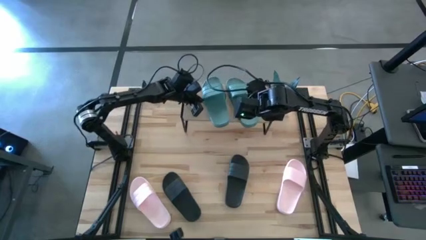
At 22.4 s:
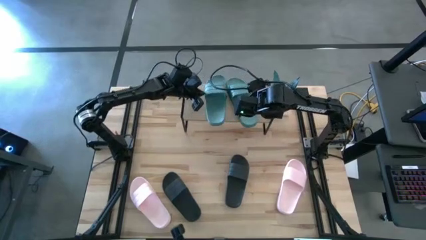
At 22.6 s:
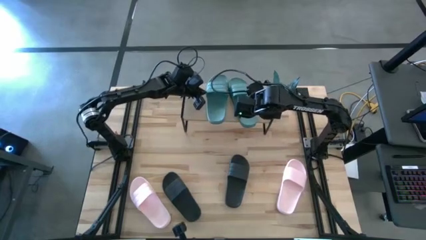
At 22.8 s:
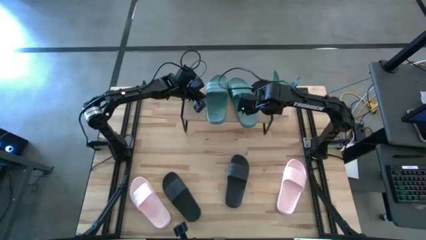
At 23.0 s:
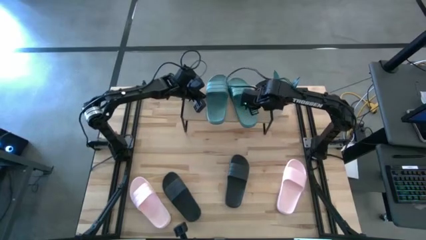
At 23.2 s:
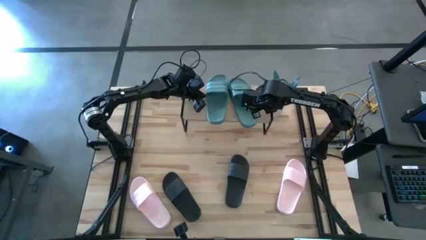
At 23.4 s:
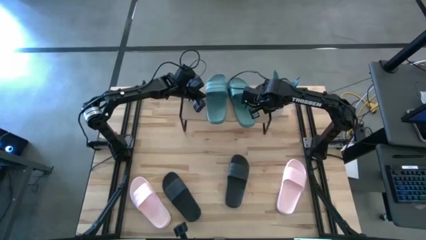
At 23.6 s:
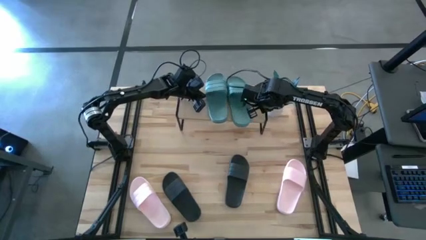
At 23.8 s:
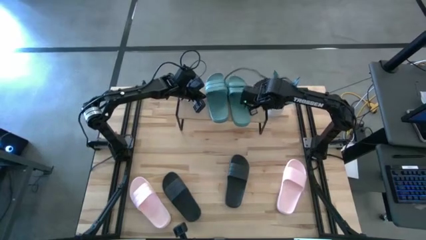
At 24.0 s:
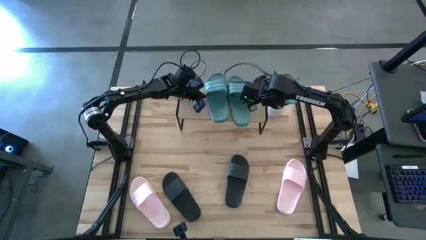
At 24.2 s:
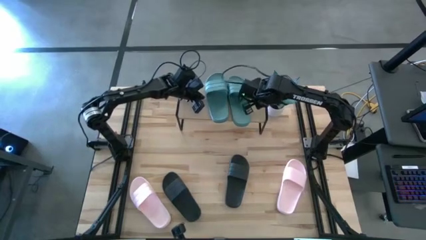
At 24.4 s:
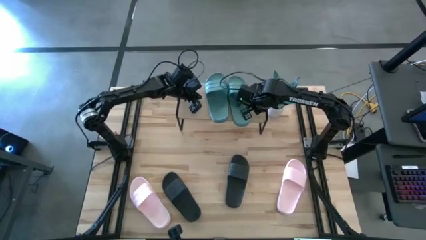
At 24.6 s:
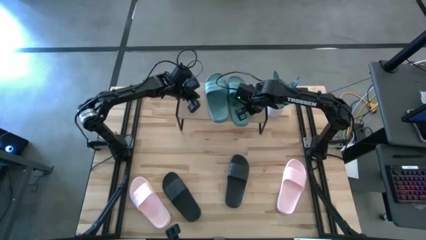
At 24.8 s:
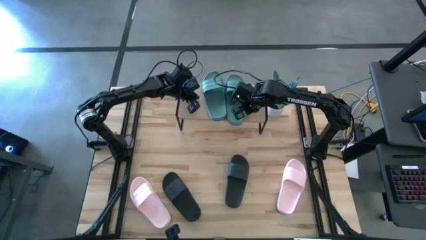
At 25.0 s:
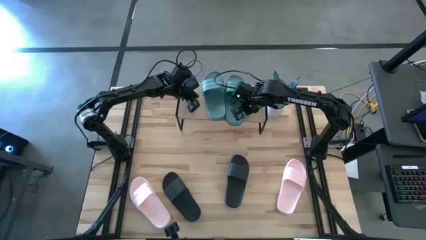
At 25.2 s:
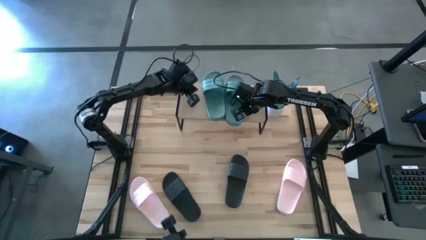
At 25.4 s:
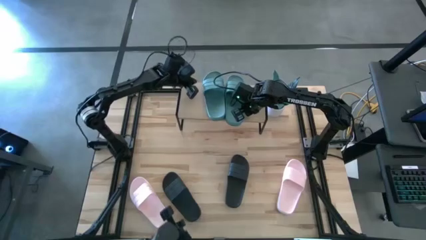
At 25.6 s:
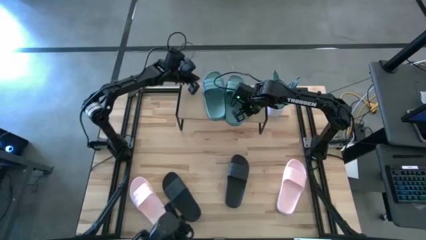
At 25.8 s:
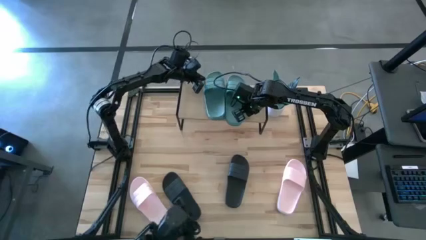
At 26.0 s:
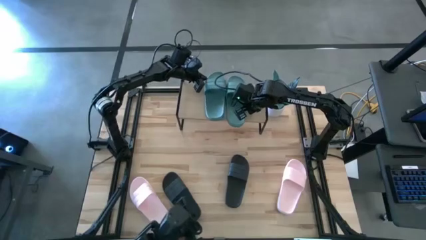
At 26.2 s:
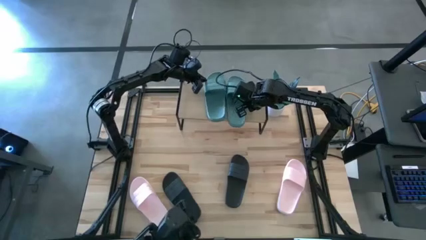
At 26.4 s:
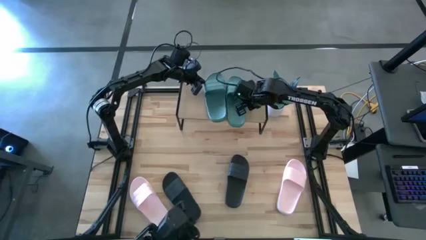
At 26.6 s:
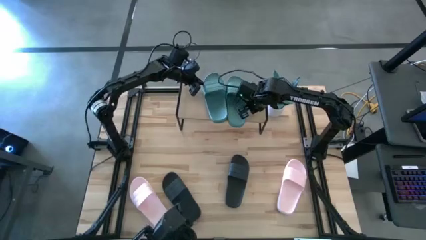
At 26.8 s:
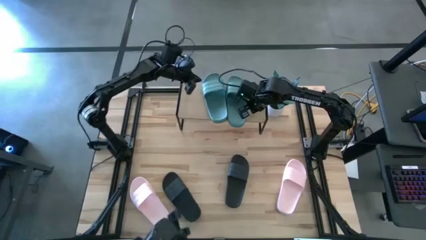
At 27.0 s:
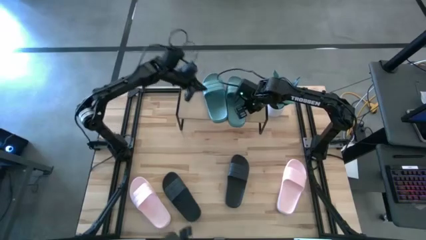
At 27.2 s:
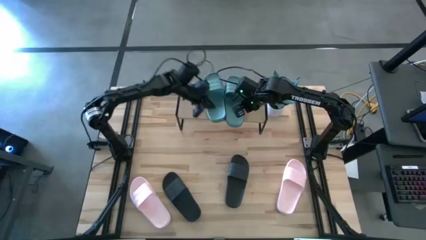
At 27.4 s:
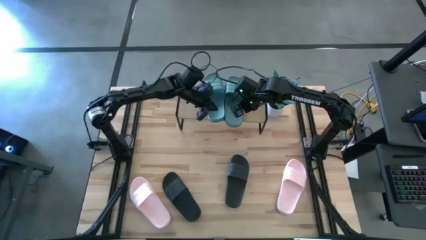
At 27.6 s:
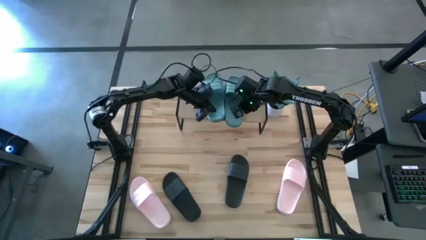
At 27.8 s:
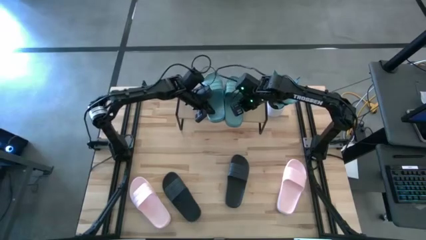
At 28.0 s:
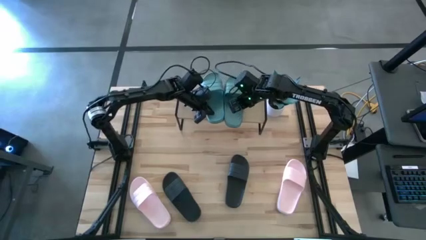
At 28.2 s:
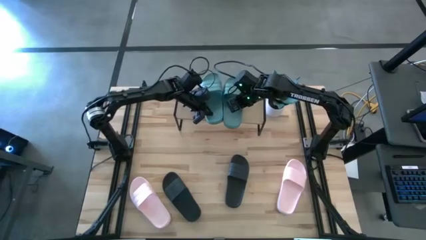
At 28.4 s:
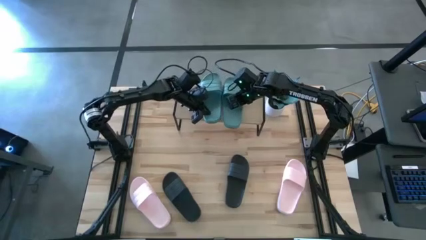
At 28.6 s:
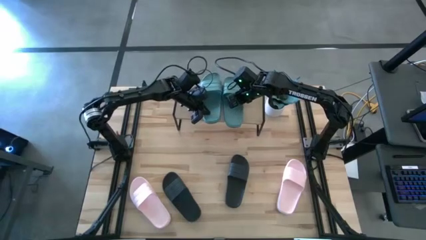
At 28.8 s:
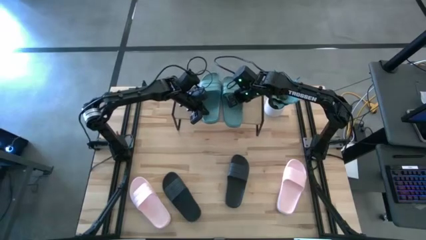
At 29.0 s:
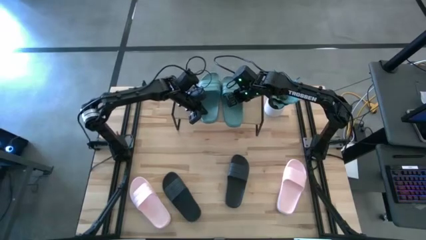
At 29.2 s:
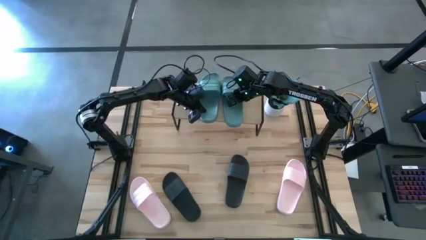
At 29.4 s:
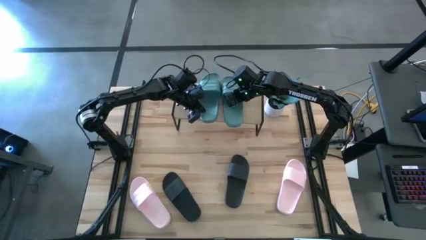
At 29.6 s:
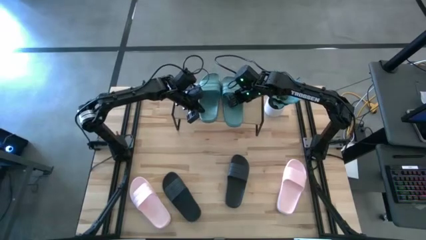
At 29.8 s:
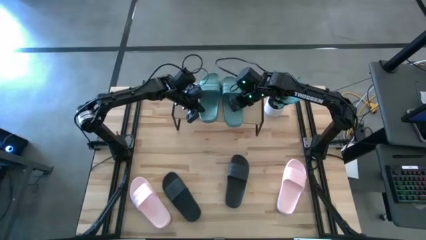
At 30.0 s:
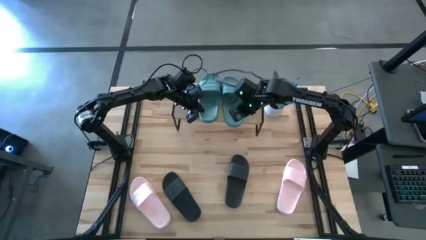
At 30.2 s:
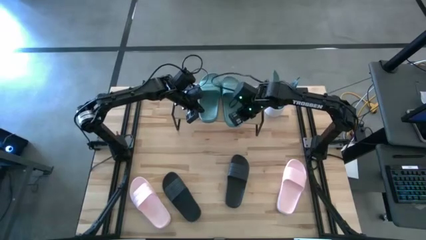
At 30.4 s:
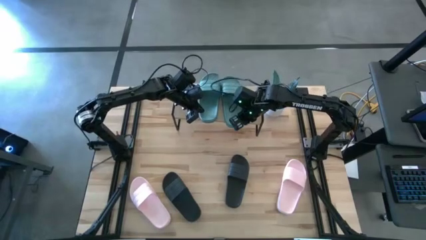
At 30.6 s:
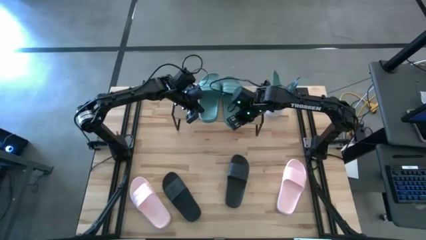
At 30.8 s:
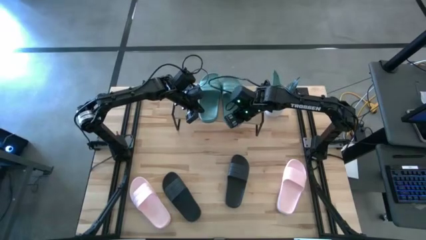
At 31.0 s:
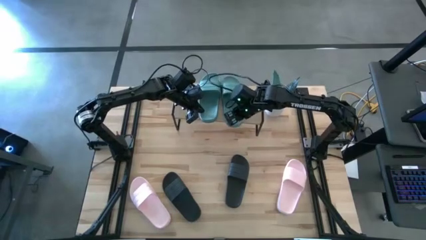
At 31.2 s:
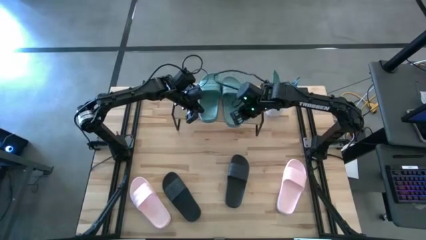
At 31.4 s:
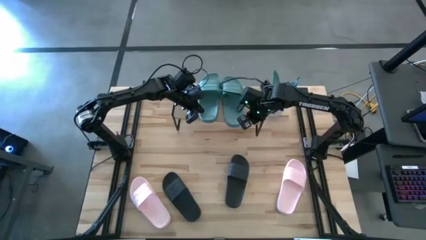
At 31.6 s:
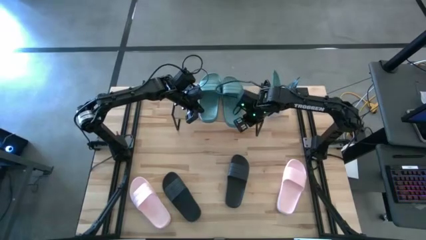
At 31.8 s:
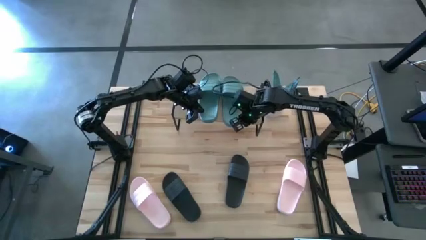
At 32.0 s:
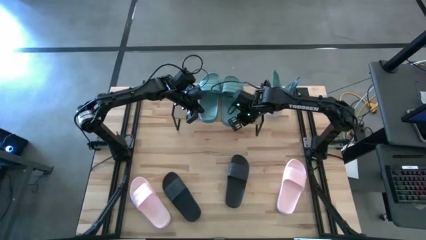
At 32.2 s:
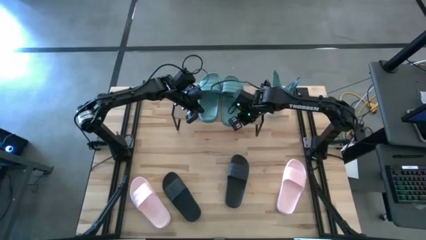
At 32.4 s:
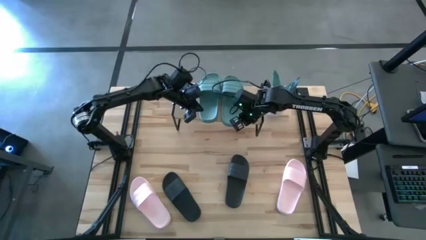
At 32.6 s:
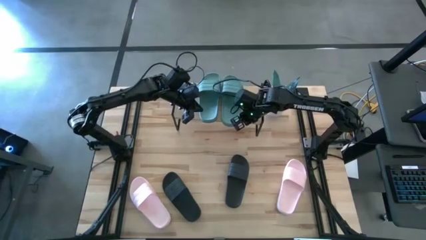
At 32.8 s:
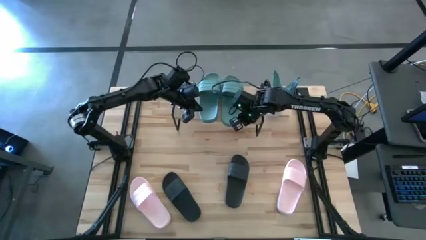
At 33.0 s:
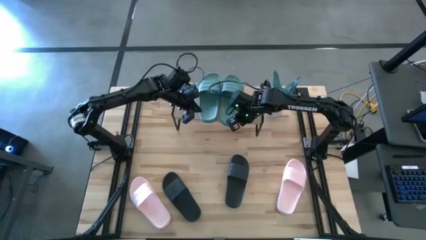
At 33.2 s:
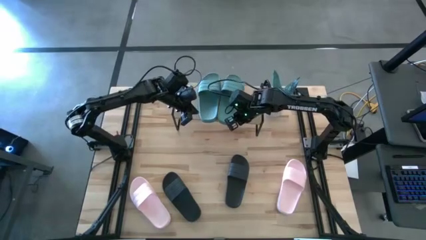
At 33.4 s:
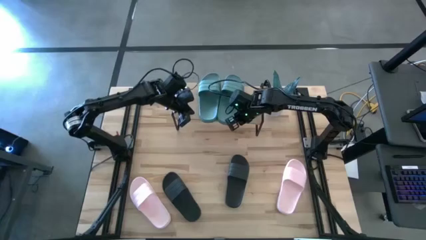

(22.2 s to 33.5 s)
Task: Pick and place slides into the shelf
Adjust the green slides on the shelf

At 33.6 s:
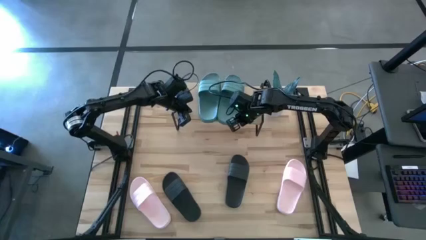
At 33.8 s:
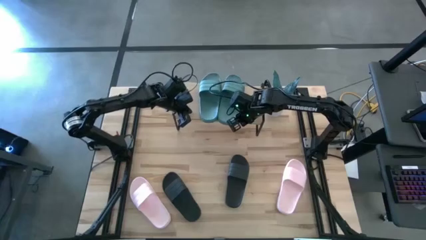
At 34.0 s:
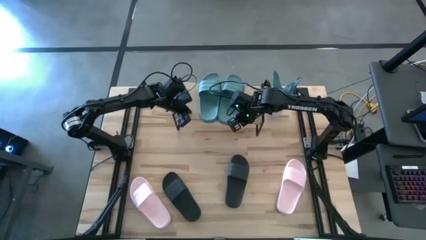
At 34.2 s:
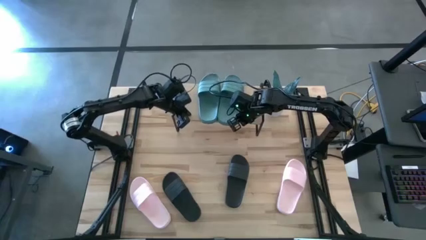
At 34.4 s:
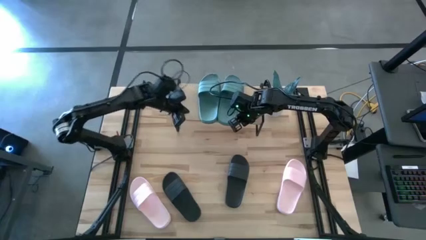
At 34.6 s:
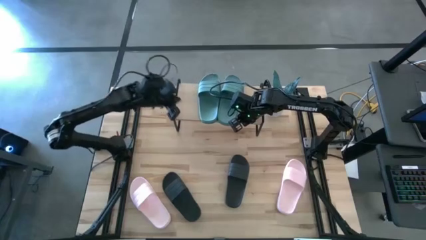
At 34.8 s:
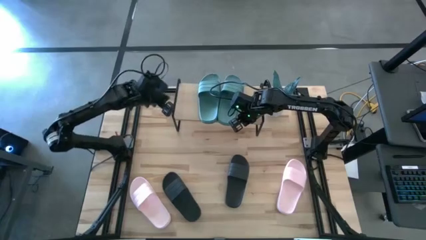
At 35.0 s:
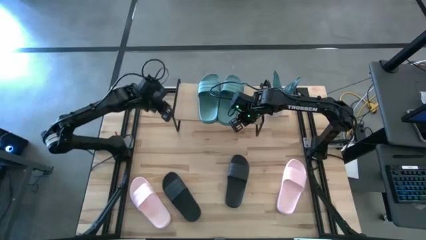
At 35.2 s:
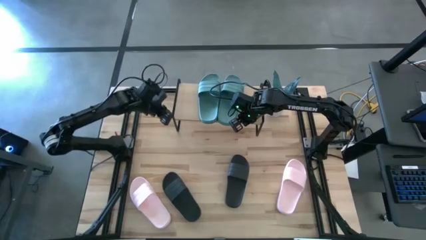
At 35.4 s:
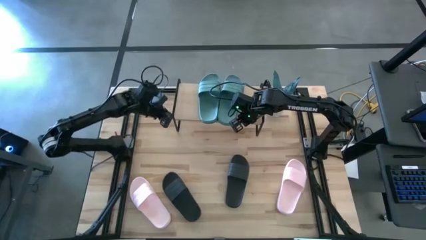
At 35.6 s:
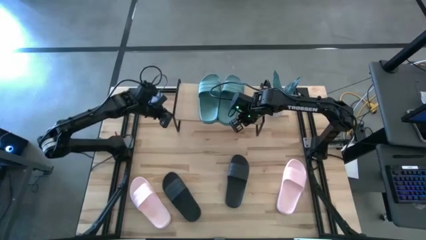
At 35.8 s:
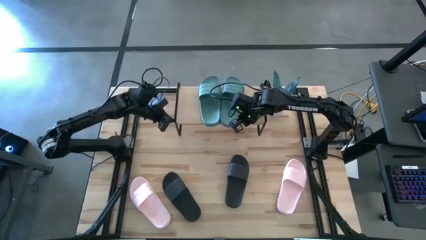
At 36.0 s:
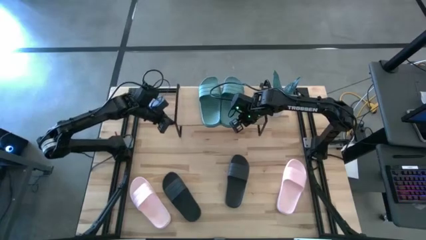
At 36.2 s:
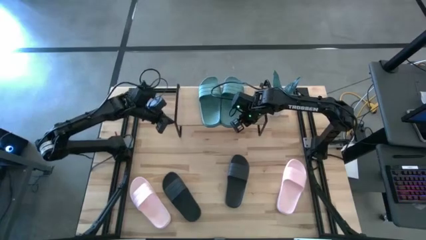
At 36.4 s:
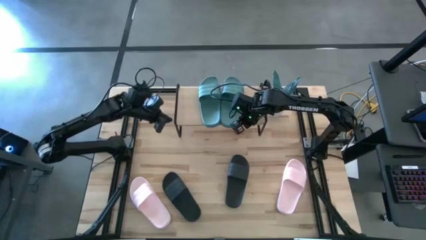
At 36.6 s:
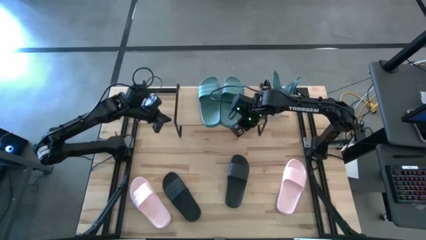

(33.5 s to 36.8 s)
Adjust the shelf

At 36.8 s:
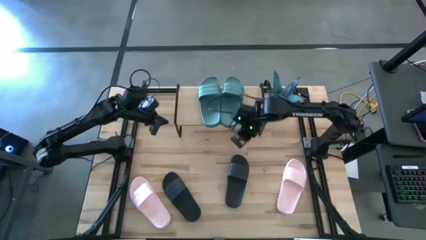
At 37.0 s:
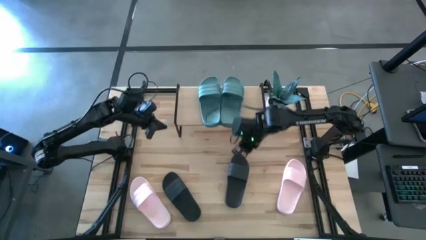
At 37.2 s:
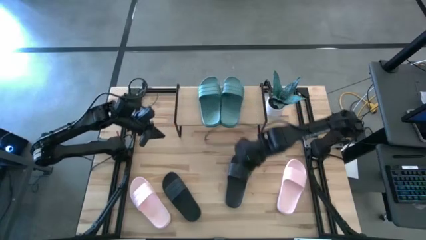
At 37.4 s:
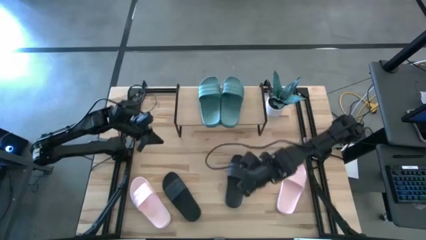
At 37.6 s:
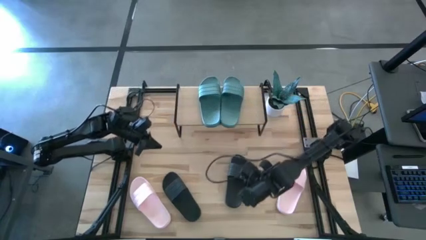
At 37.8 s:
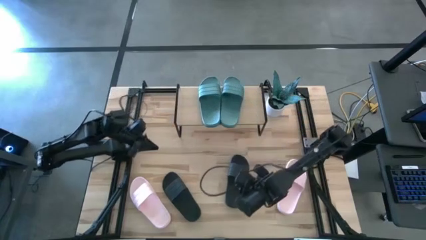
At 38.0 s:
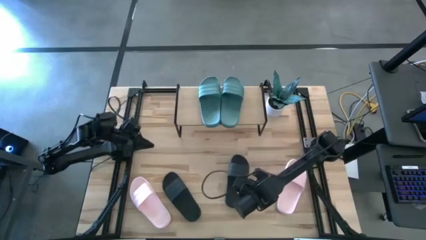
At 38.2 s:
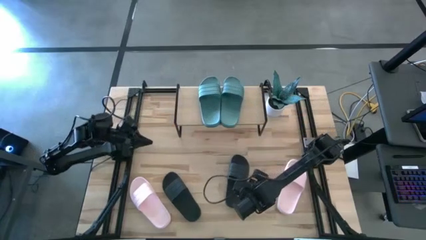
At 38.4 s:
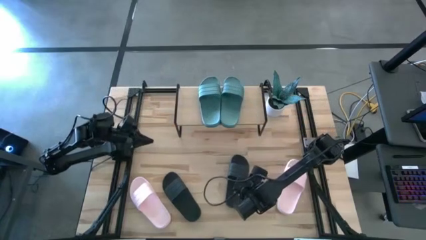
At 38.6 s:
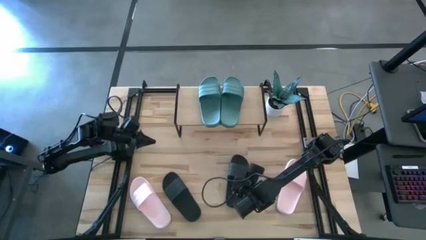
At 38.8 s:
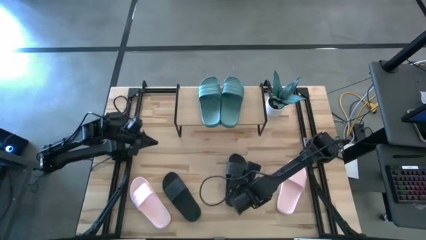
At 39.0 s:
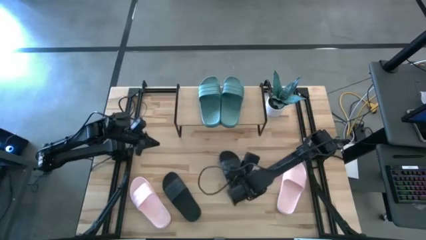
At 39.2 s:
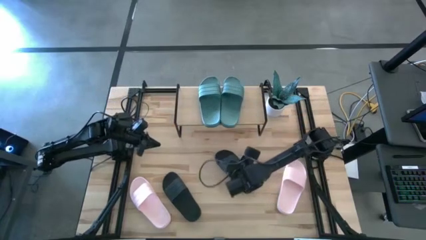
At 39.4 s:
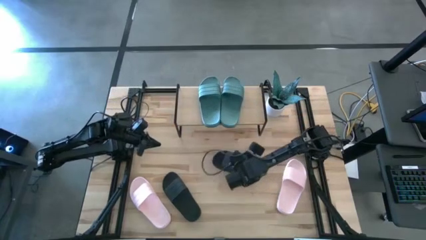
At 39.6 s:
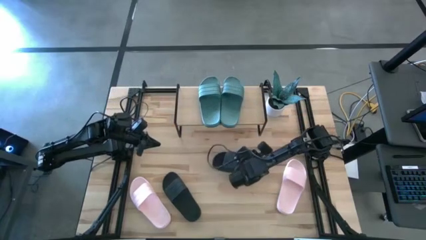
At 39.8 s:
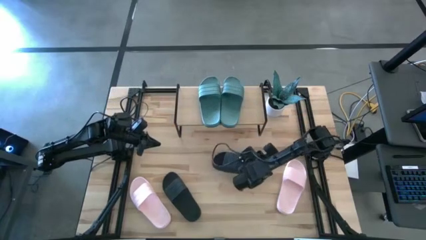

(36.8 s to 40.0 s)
Put the right black slide under the shelf
